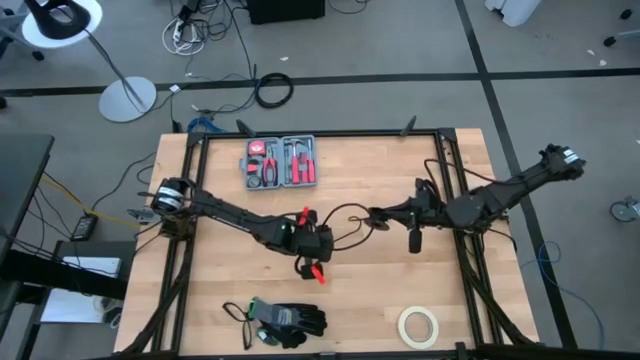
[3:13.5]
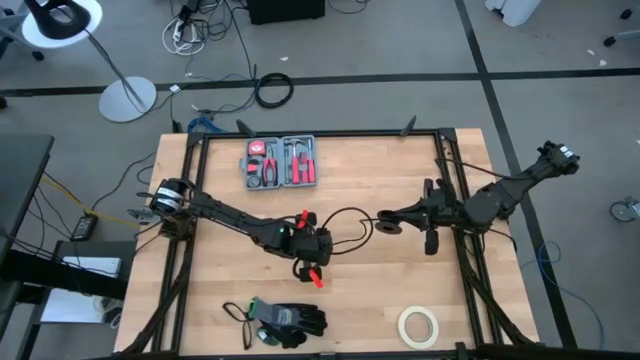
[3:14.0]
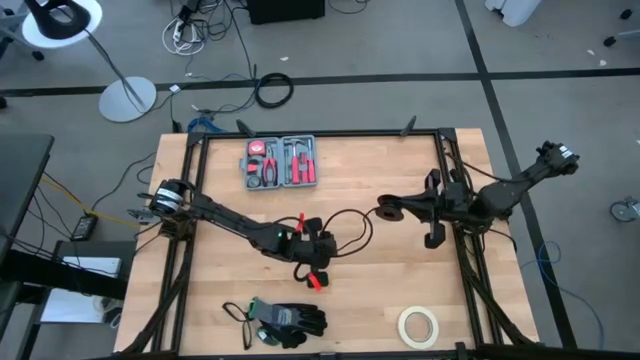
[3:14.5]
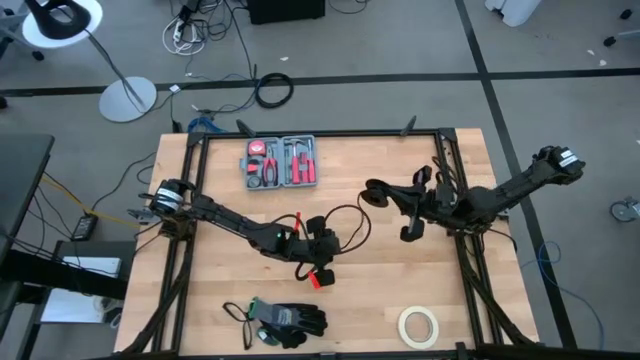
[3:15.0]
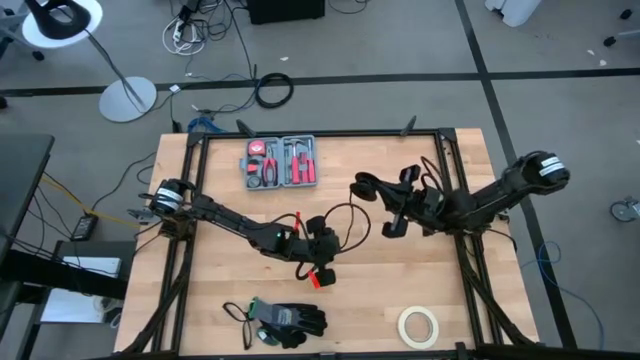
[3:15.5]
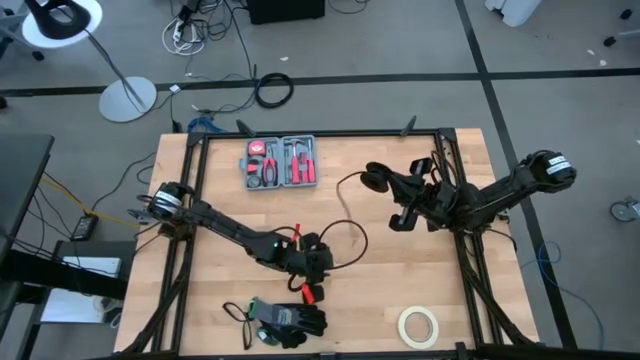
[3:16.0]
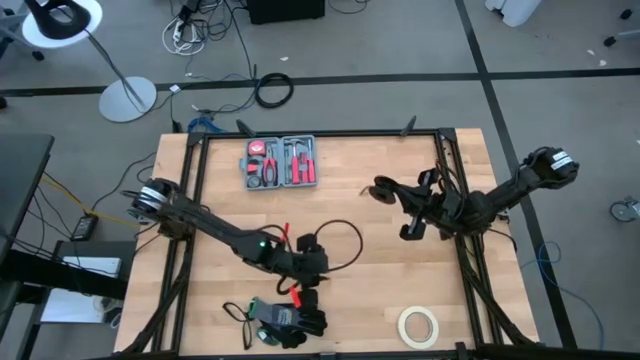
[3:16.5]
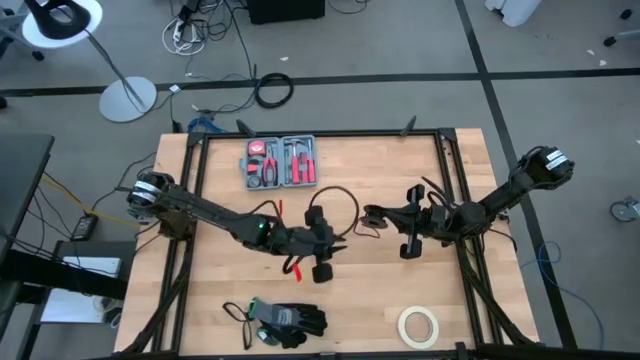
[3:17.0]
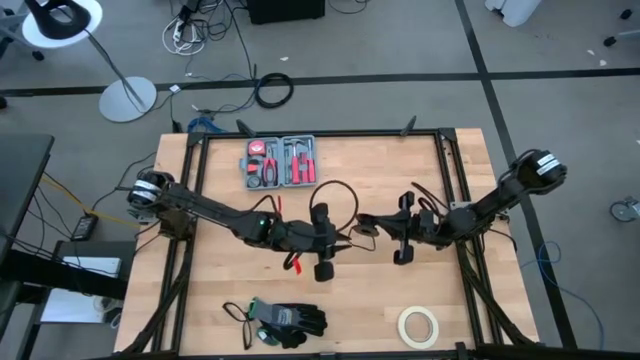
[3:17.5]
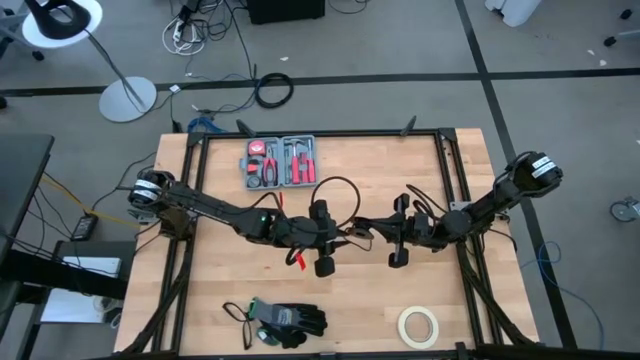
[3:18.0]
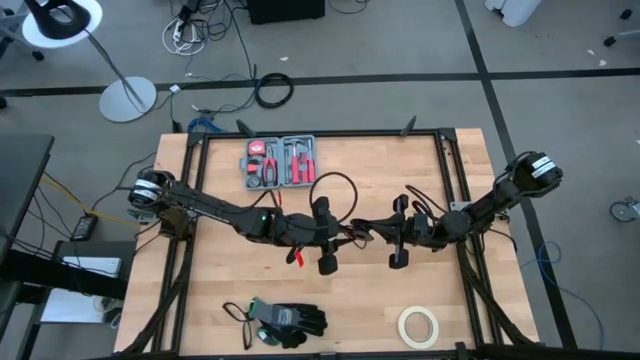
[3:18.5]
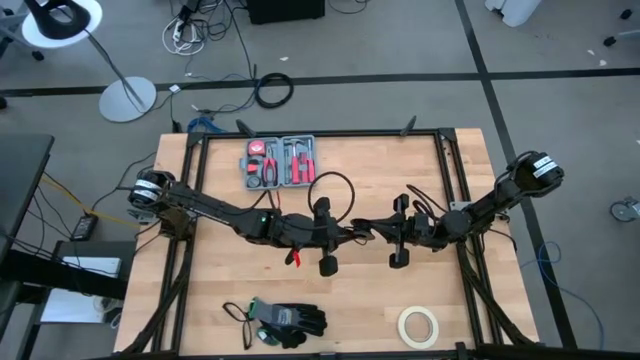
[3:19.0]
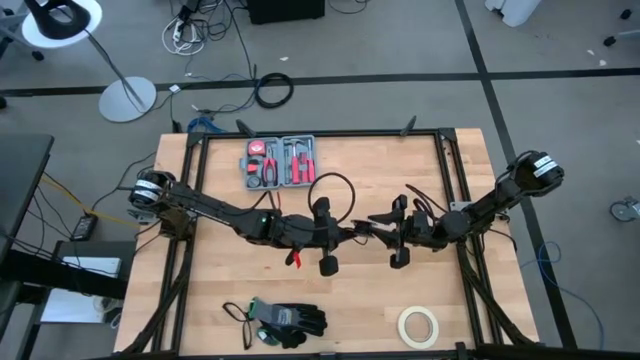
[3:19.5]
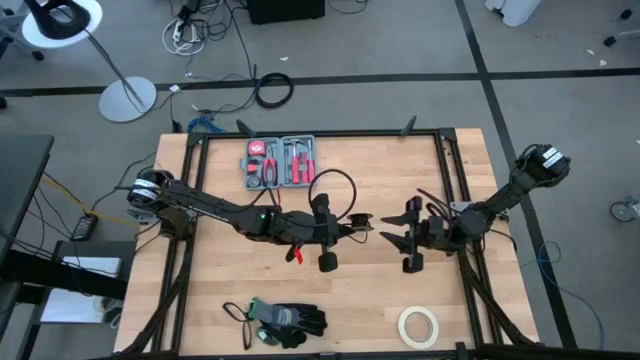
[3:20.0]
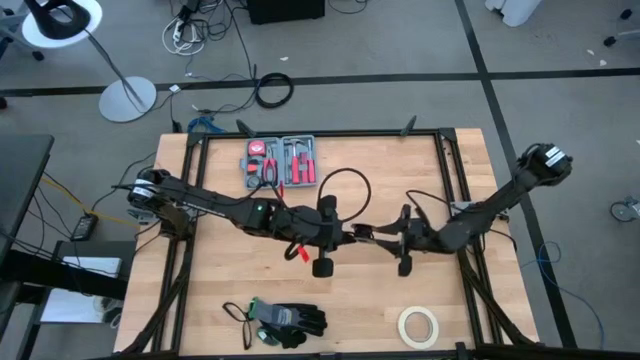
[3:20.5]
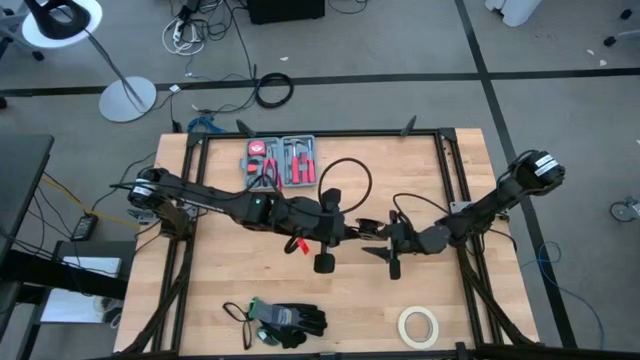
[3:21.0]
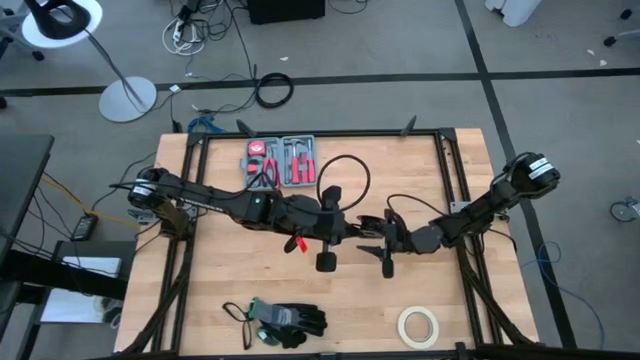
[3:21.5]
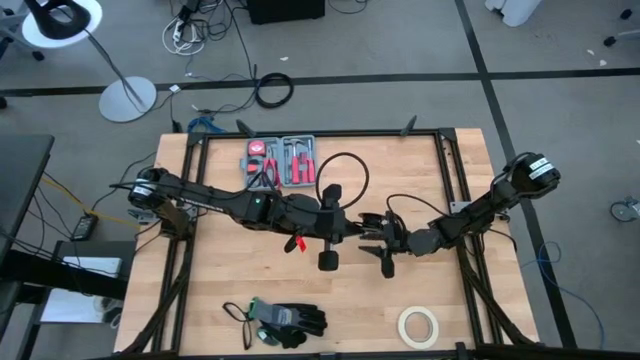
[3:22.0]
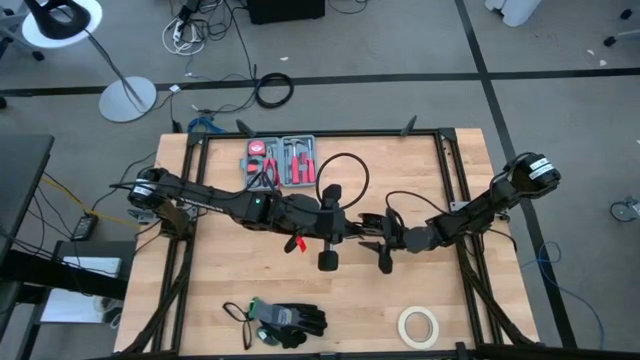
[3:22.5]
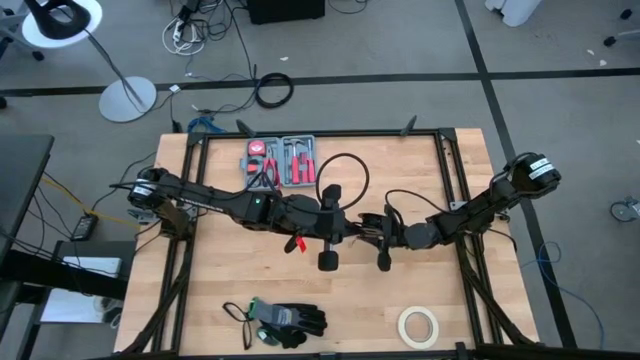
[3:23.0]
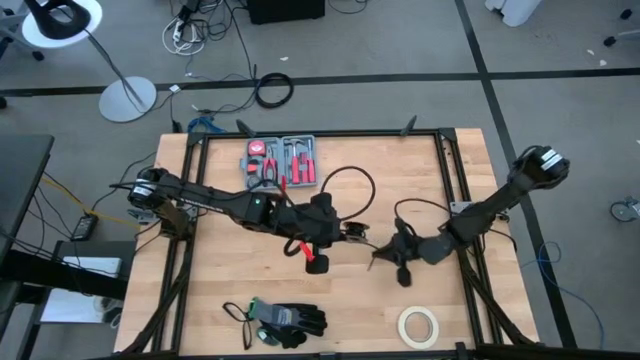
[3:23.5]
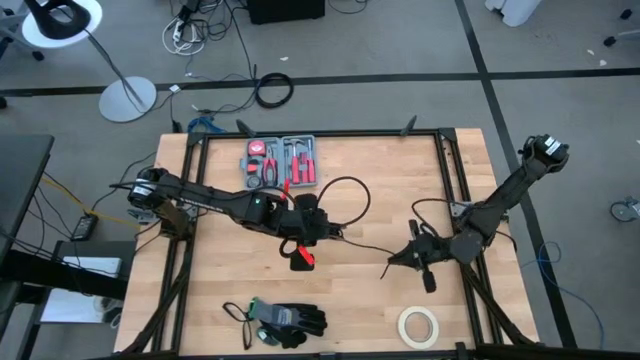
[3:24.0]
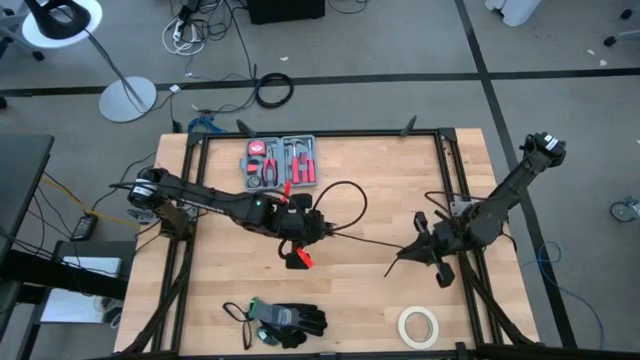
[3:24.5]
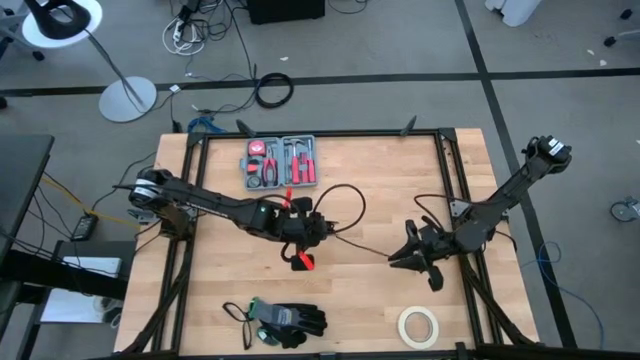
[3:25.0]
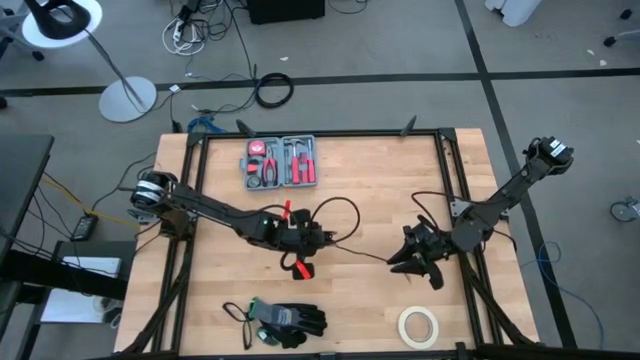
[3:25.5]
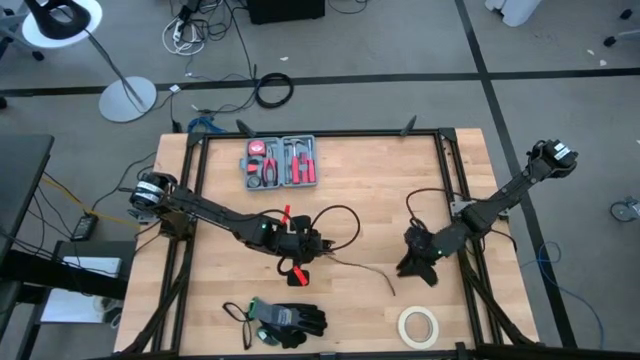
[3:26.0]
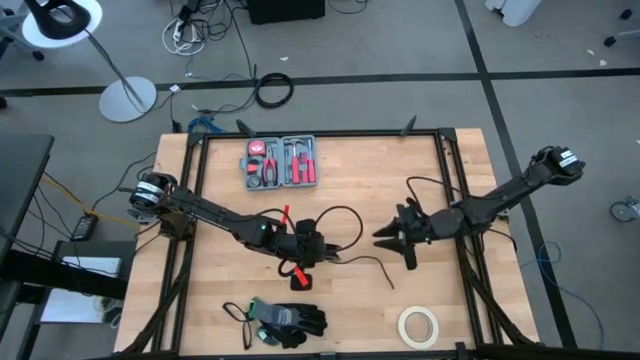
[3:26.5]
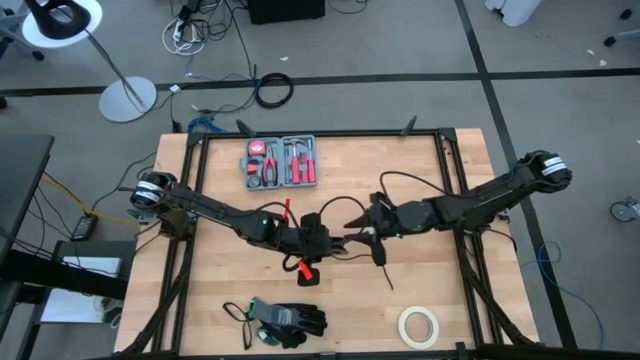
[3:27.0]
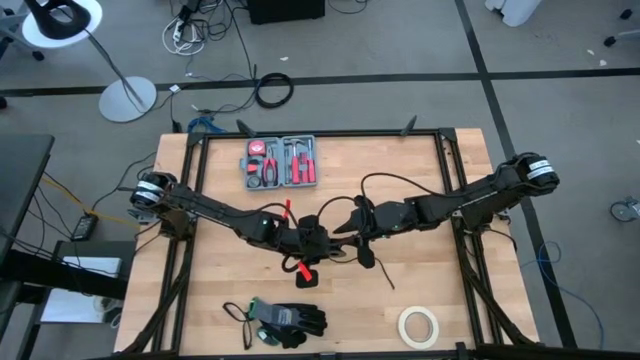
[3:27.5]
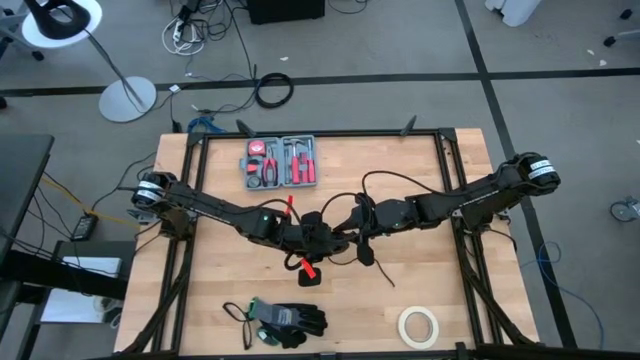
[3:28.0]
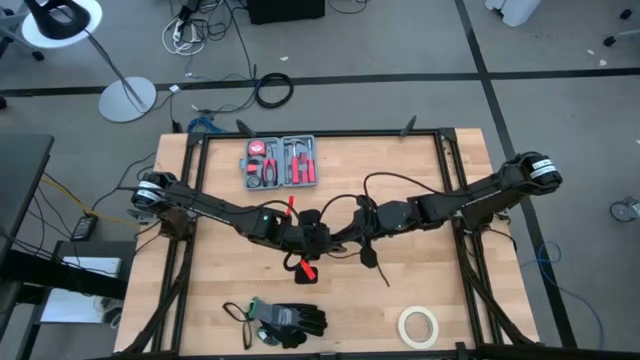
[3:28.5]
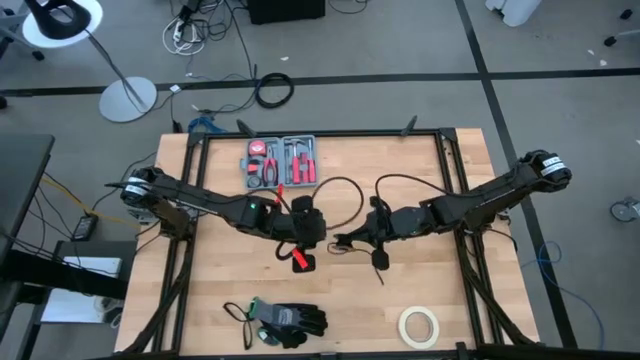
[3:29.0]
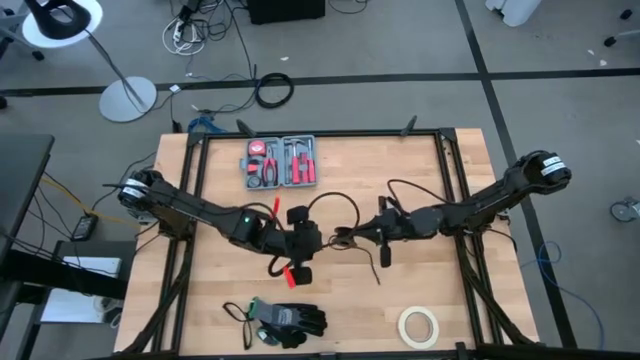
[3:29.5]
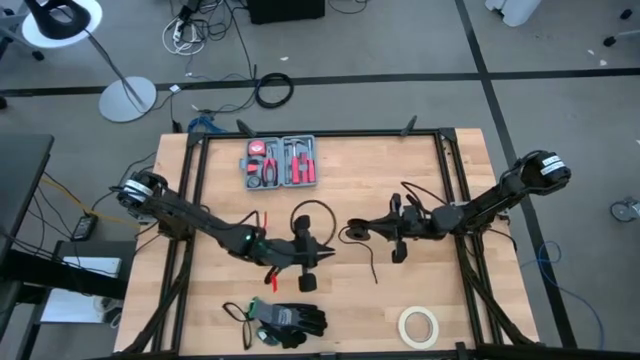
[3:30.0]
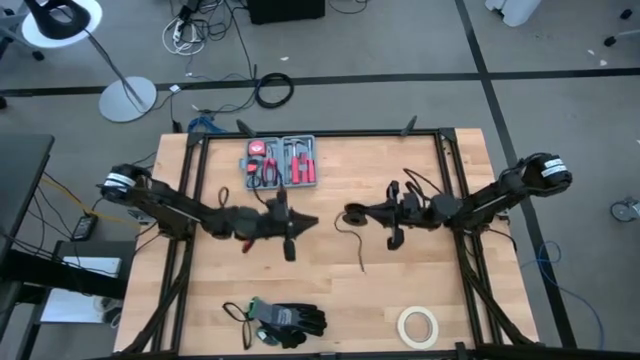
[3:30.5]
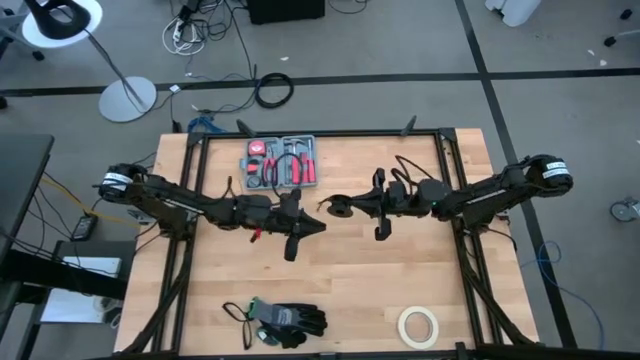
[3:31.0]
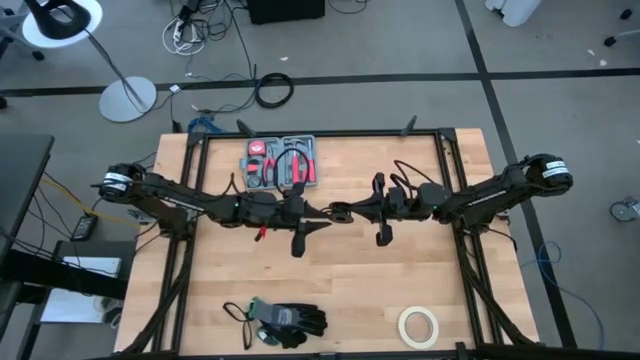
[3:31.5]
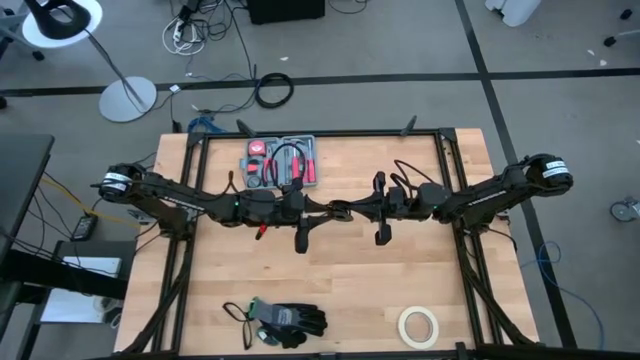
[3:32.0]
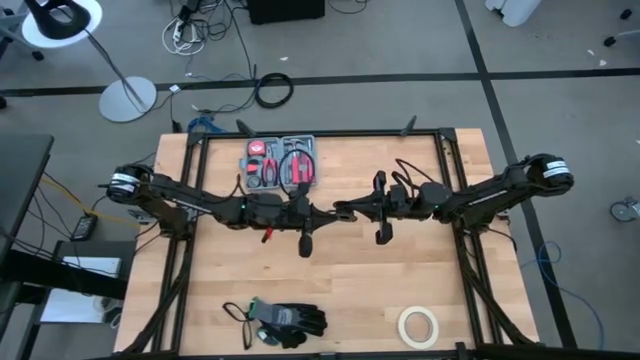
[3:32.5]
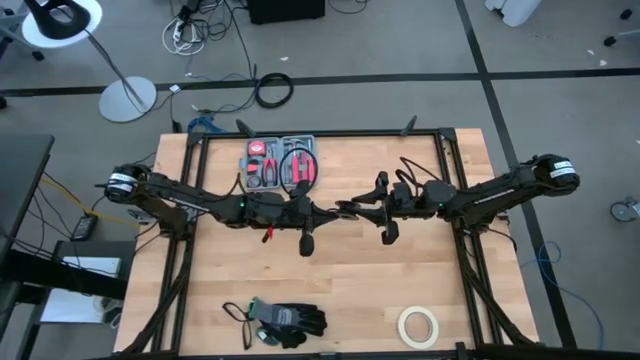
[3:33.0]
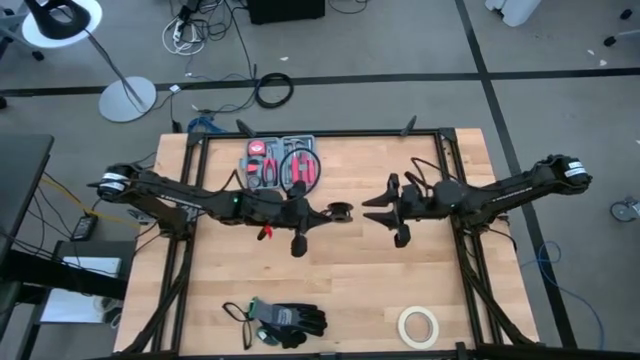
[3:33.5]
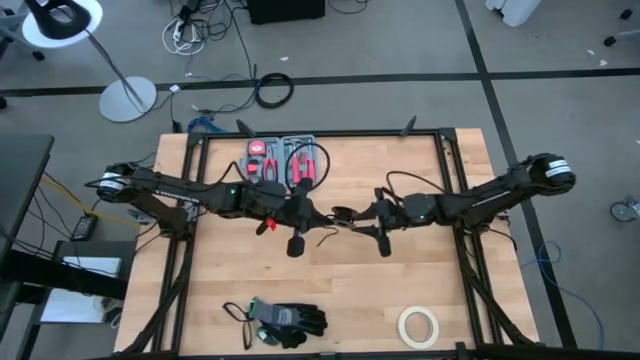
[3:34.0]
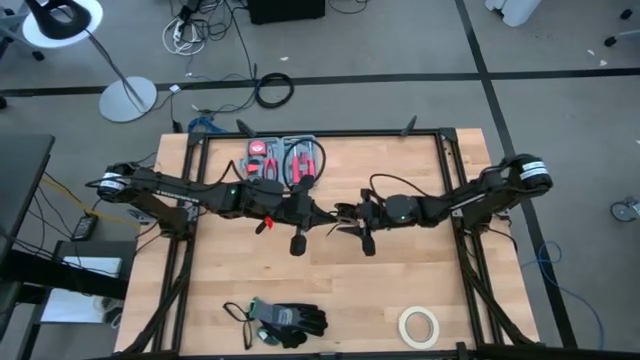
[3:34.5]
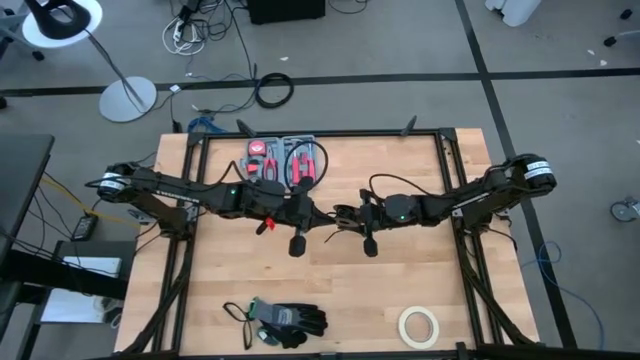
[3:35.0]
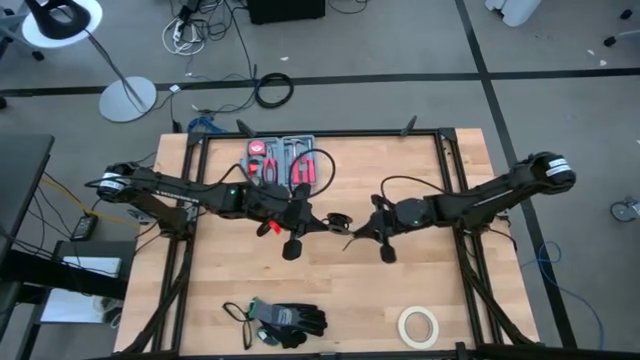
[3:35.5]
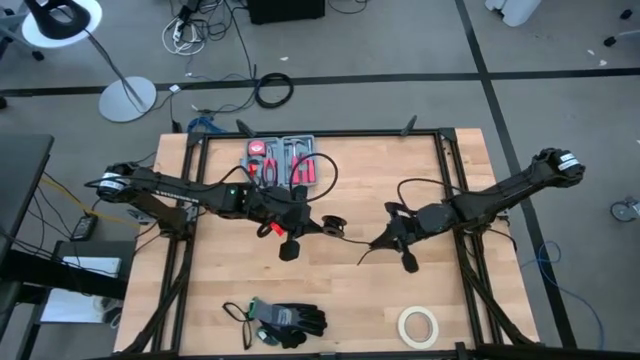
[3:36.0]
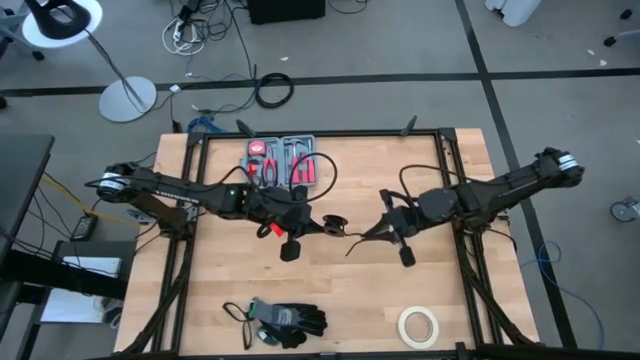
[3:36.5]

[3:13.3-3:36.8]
Task: Coil cords
Coil the black wire cable into the black spool
